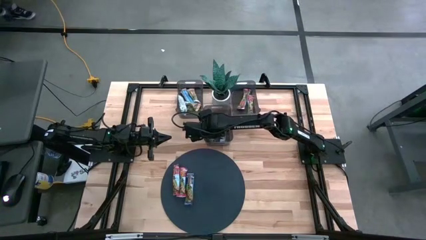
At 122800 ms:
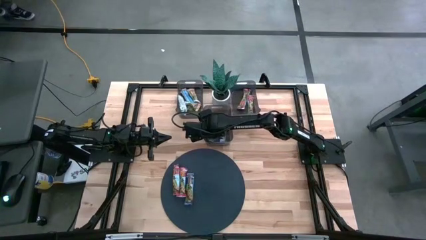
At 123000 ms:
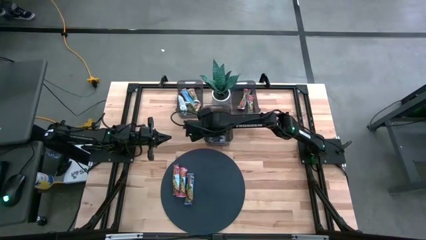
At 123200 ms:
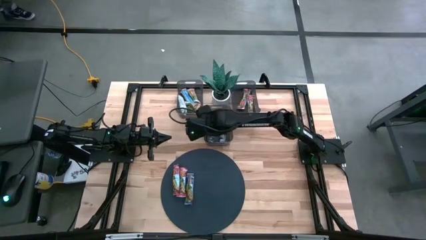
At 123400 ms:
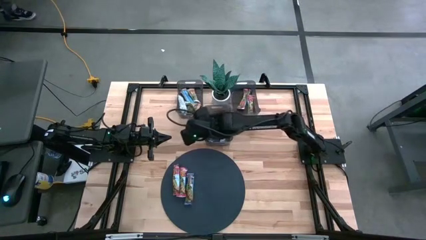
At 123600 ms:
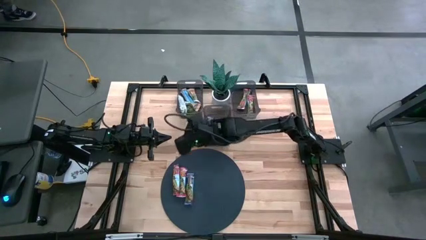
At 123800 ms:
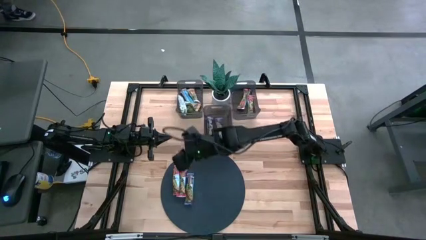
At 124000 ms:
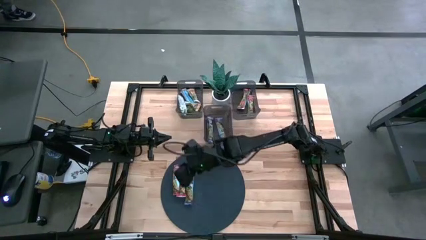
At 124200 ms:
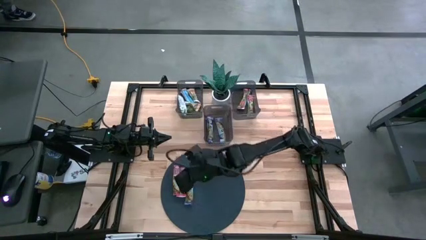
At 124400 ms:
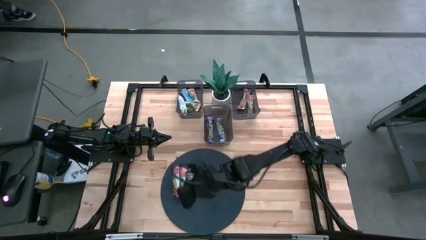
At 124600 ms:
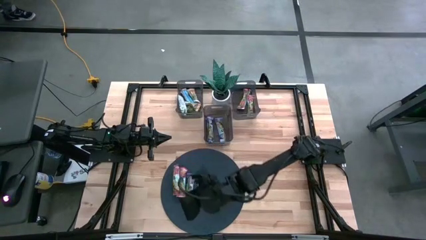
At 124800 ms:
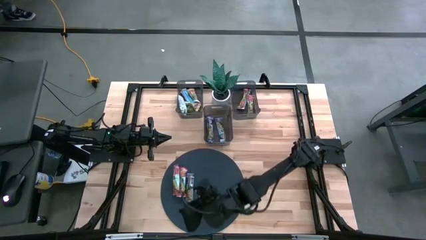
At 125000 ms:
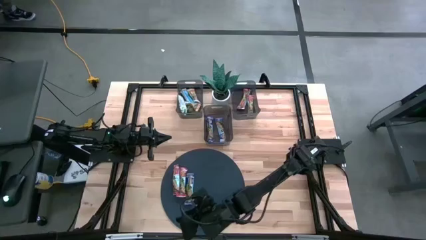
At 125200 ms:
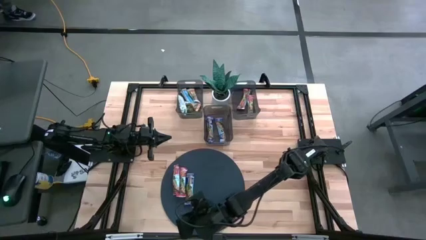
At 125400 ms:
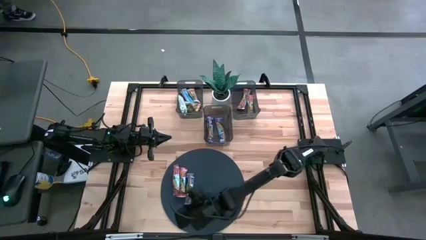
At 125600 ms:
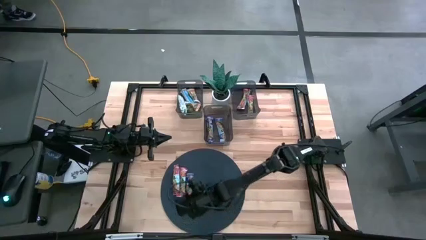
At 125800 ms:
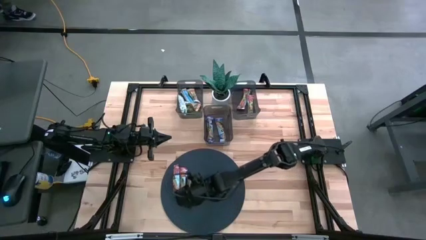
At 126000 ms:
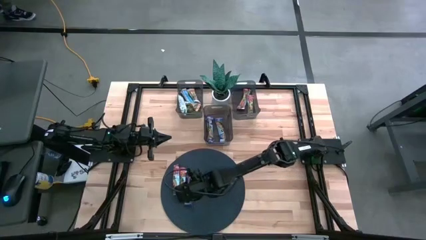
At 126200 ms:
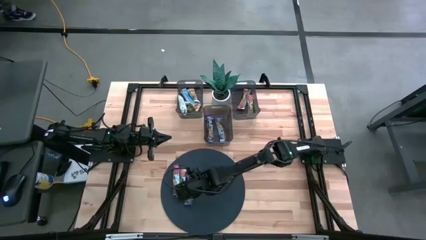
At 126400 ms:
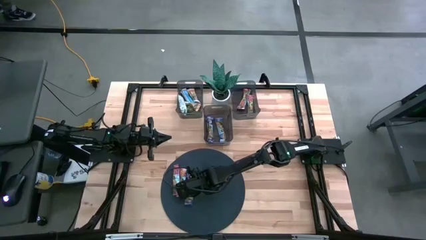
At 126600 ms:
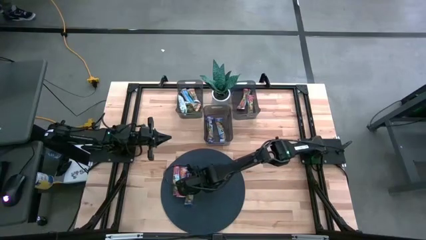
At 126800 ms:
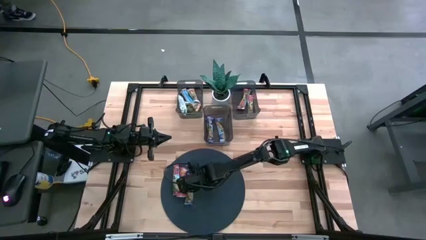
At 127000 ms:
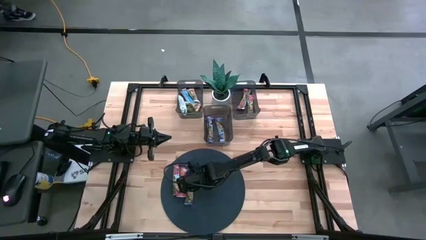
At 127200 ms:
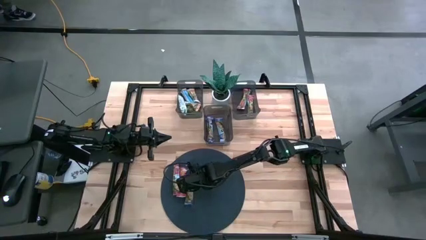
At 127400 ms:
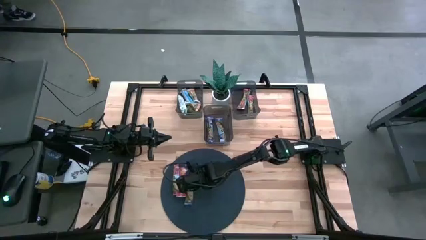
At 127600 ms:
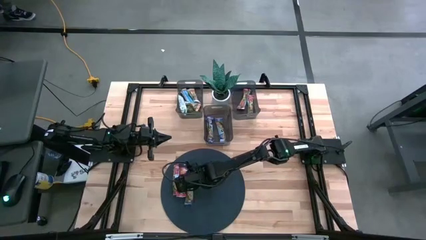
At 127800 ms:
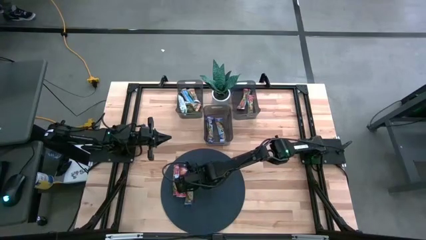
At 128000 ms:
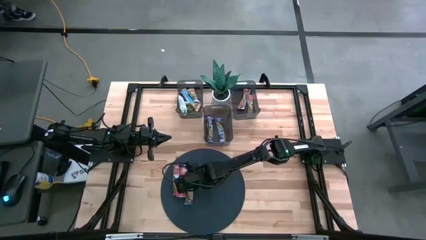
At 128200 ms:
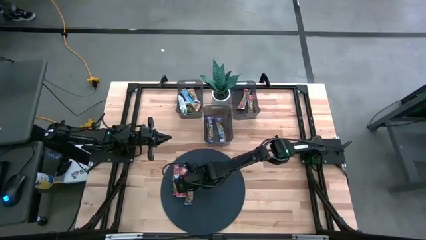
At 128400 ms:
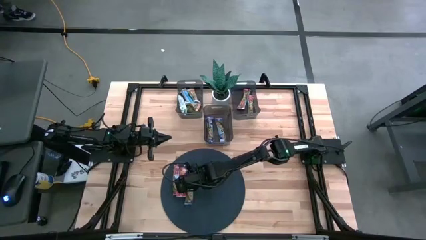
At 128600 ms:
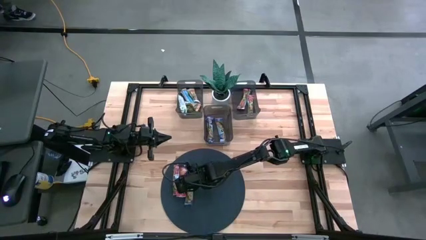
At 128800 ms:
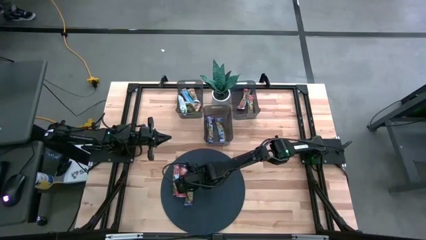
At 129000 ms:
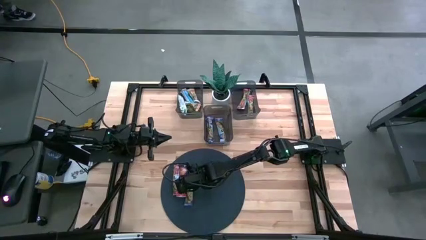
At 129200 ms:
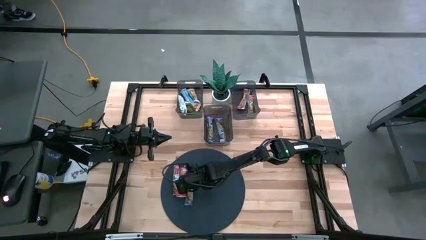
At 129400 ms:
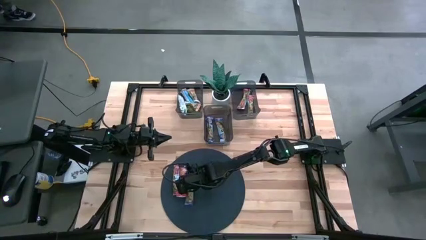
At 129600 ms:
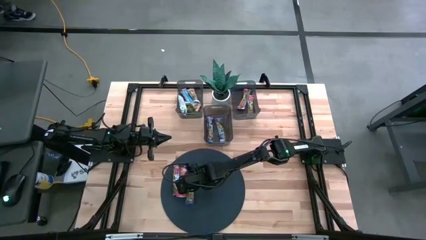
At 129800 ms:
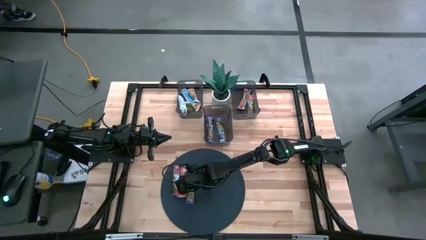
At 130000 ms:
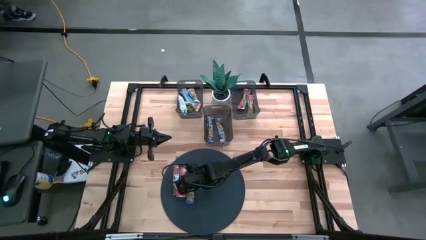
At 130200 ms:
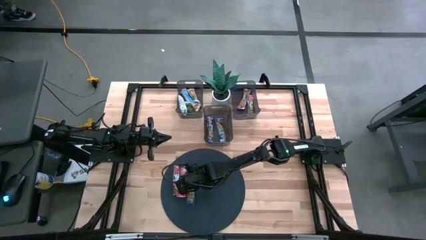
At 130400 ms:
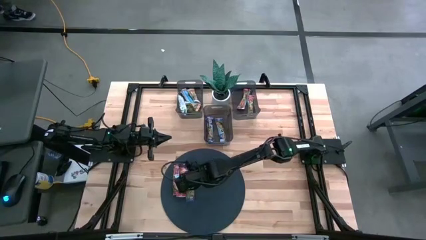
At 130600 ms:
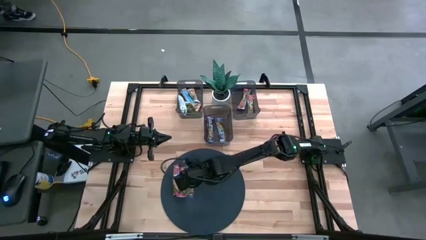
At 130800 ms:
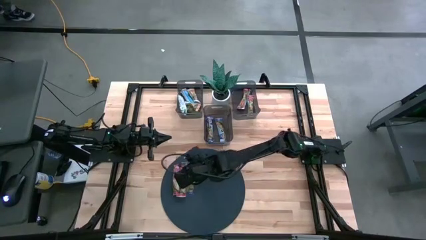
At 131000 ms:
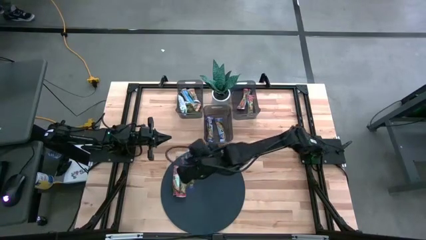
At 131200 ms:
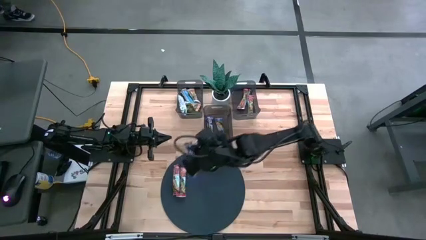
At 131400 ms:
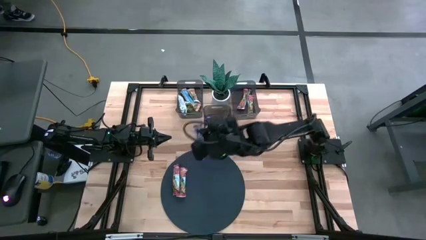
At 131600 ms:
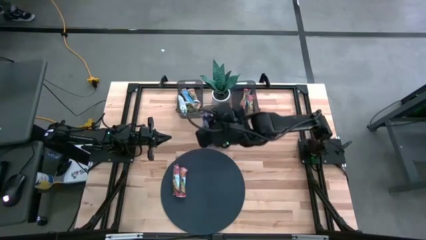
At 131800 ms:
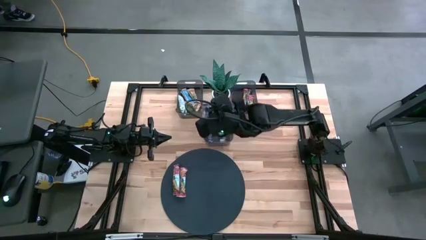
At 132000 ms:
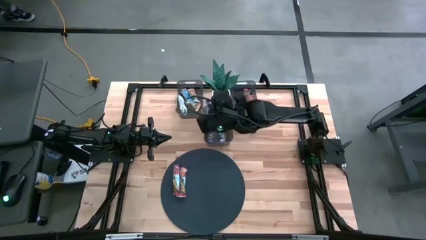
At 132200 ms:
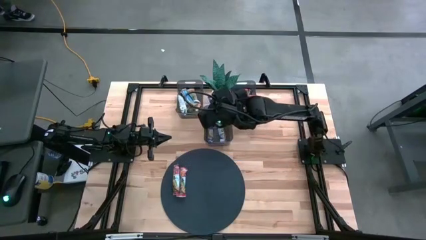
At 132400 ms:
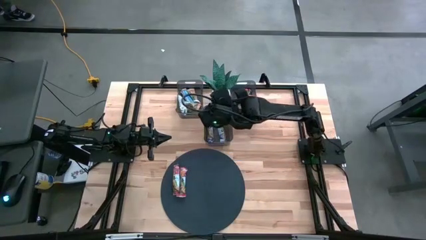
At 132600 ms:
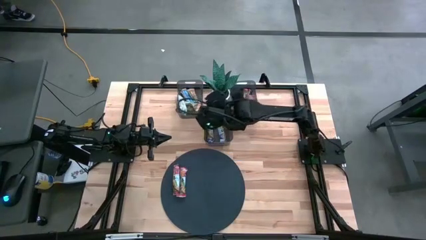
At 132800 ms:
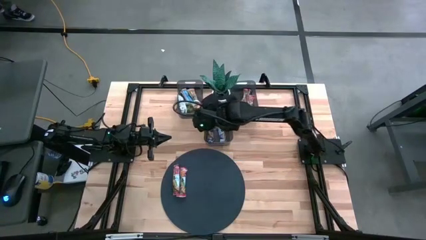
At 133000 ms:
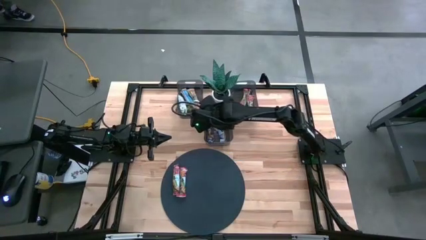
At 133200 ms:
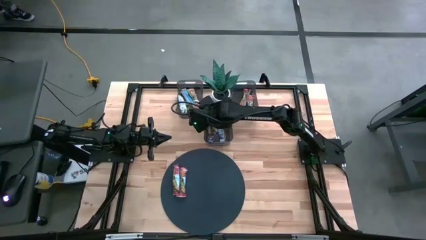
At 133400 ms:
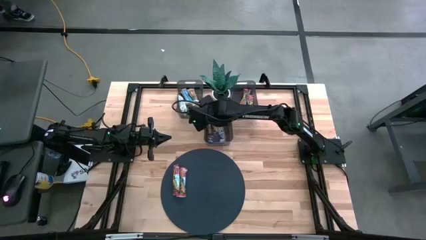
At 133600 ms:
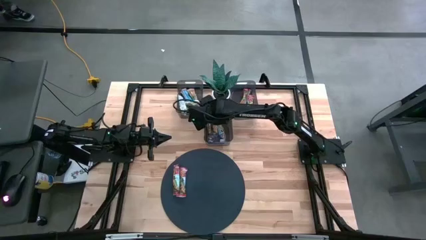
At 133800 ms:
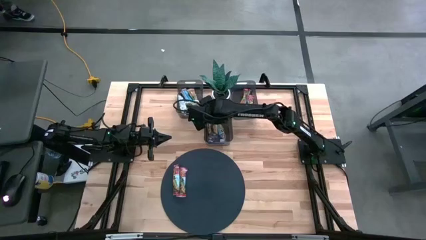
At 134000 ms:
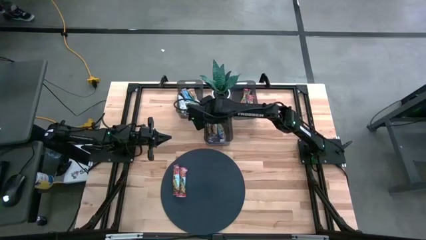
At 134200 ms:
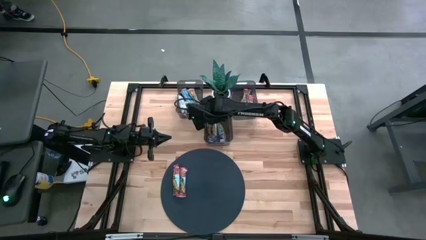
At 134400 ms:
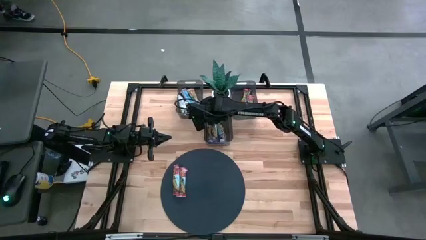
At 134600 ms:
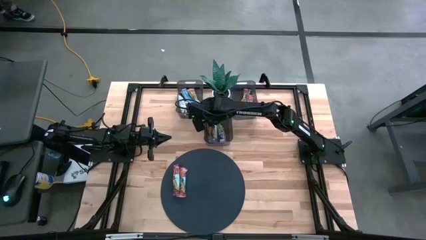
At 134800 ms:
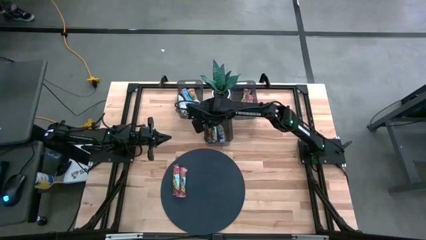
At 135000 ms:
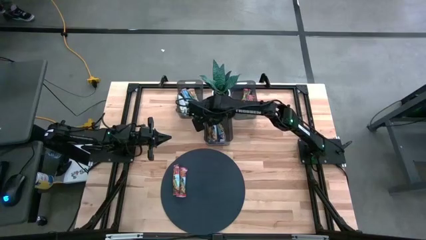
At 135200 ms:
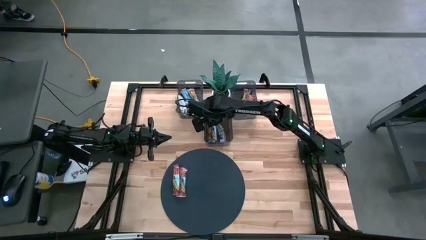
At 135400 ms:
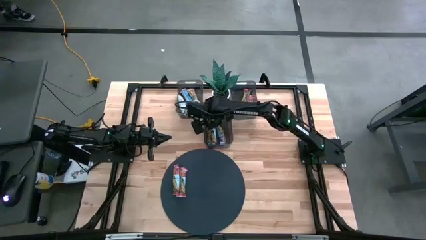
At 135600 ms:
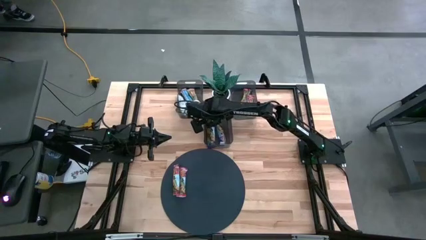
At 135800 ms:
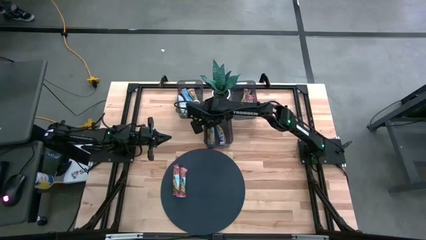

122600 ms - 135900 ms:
Task: Pick and place Granola Bars by type
Put the blue granola bar into the middle black bin
